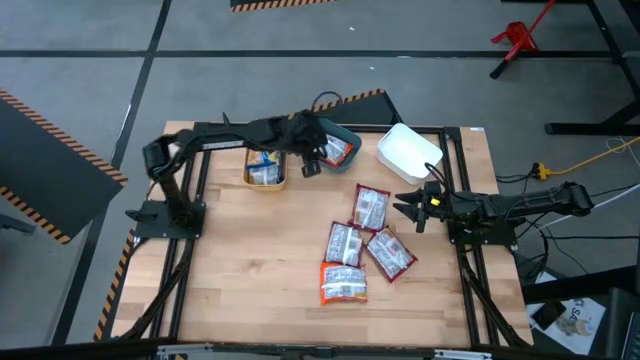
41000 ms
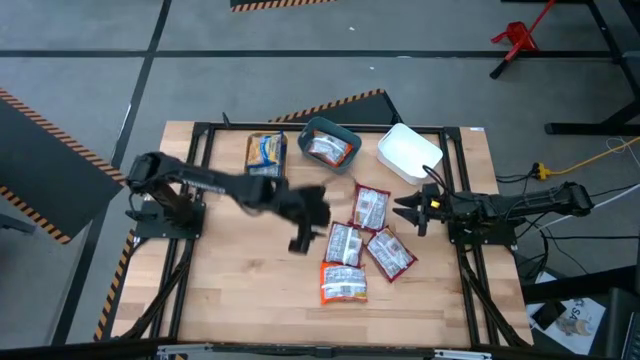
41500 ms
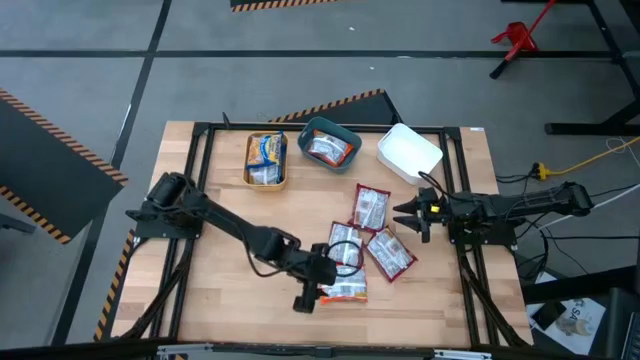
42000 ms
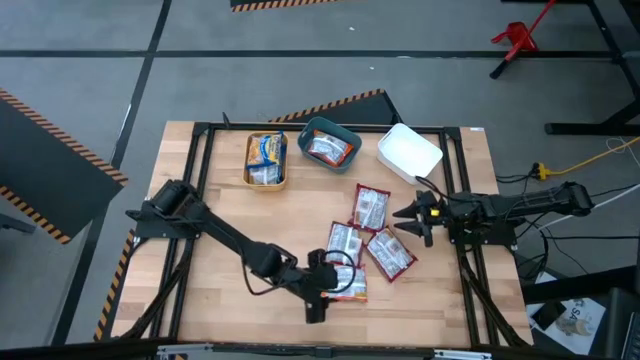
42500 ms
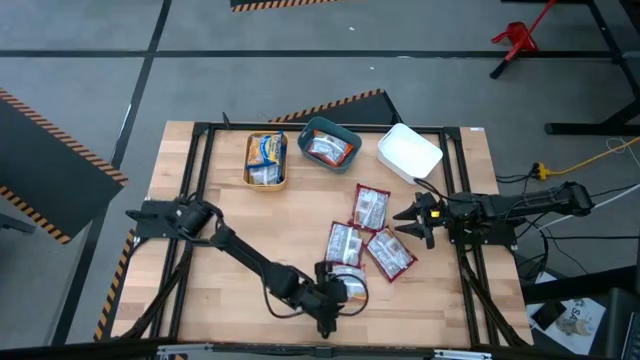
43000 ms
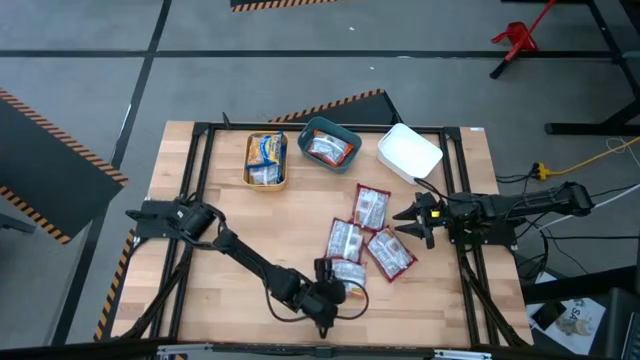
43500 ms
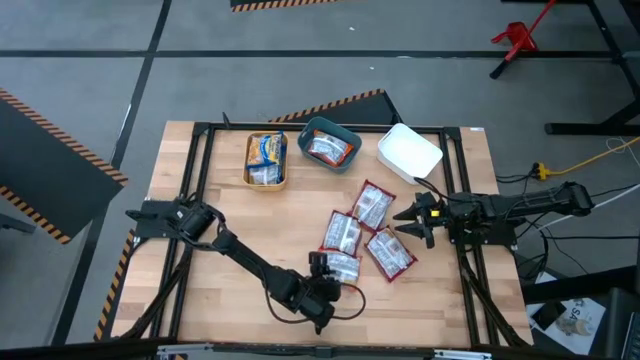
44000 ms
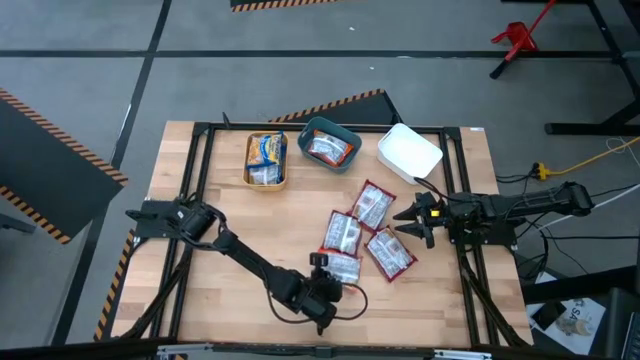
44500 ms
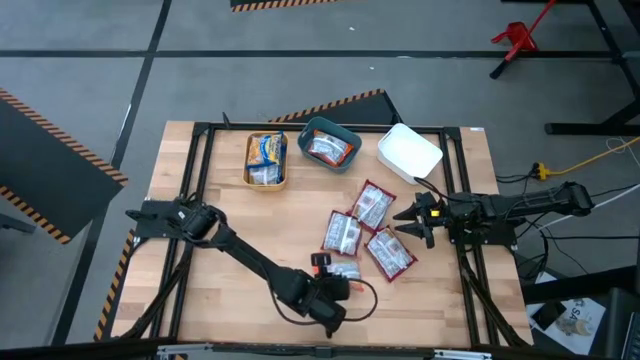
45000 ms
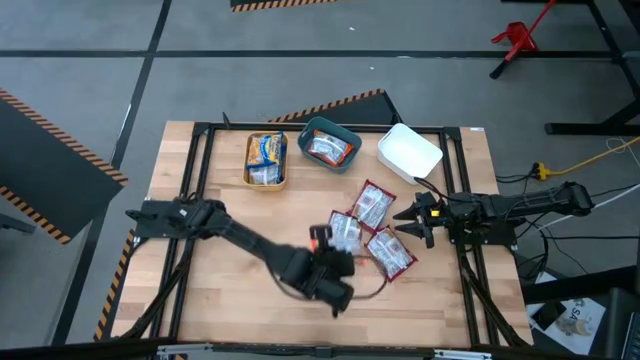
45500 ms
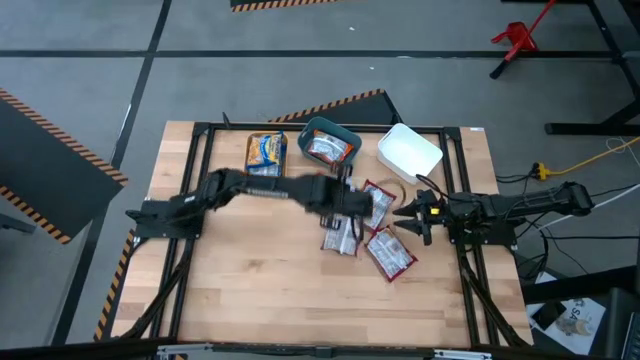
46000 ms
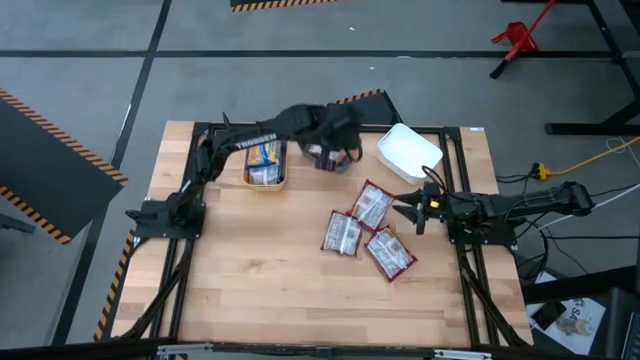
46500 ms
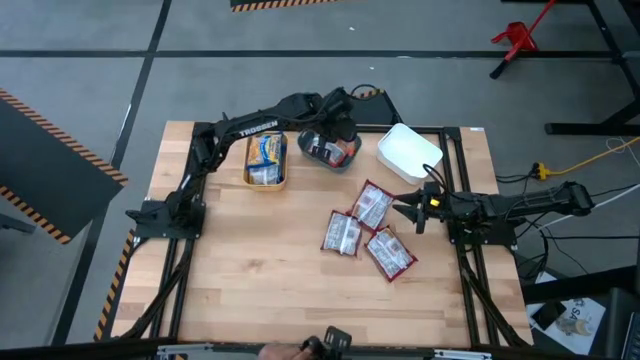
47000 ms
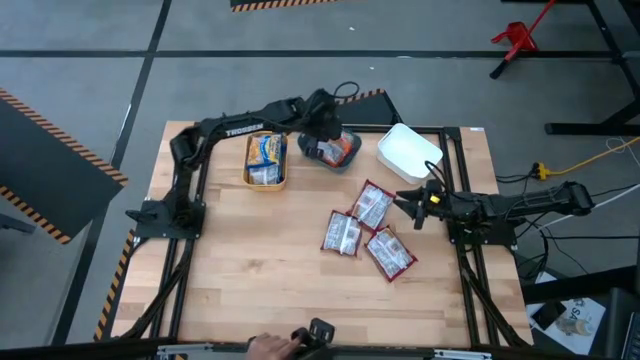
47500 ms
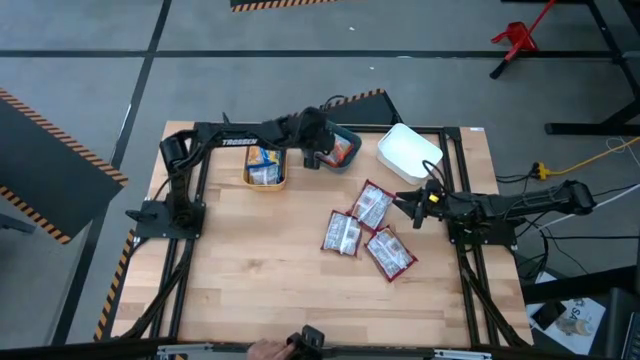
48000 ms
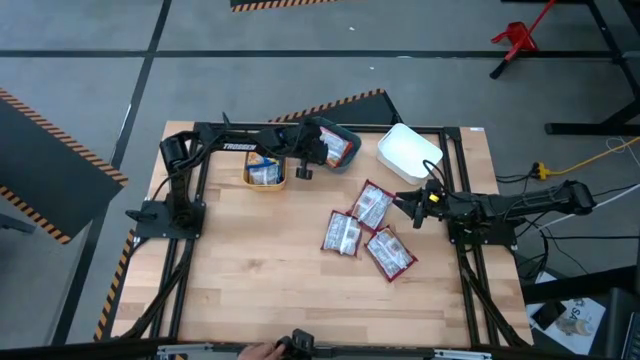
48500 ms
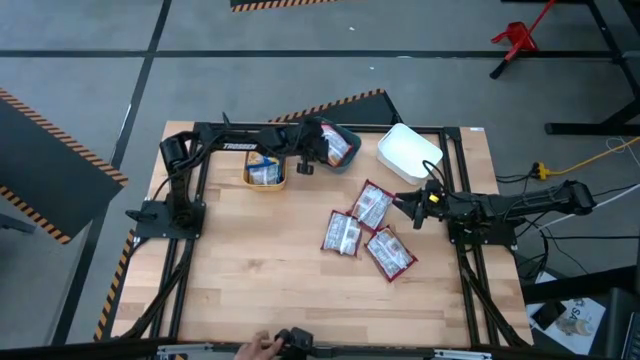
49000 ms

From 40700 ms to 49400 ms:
Task: Sort Maruchan noodles
Put the orange noodle pack into the blue bin

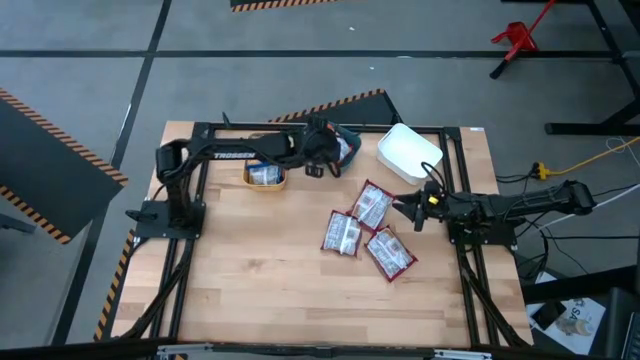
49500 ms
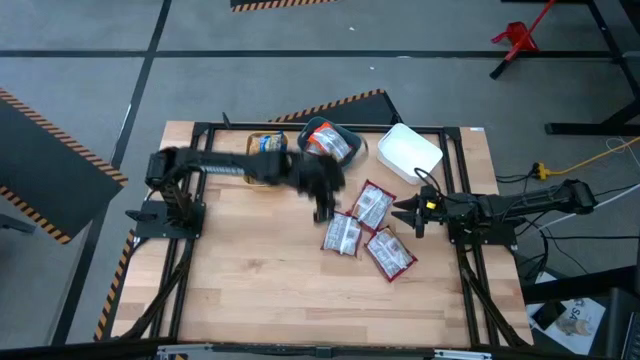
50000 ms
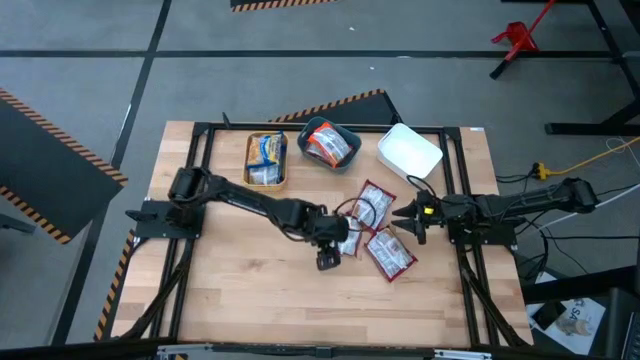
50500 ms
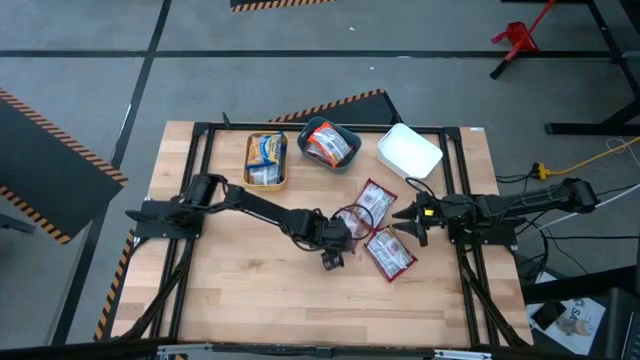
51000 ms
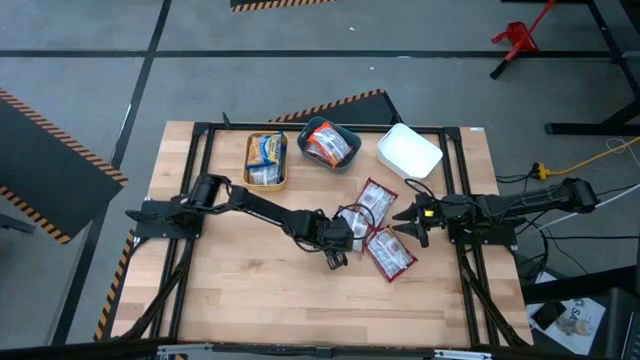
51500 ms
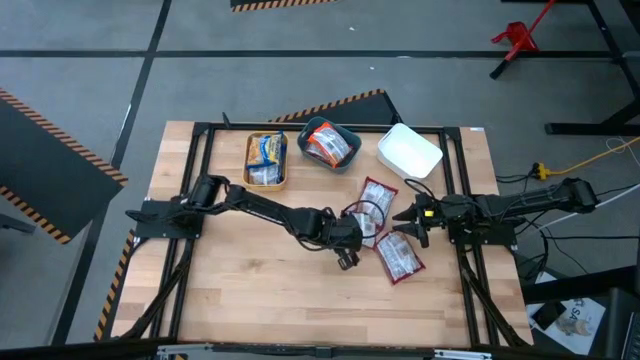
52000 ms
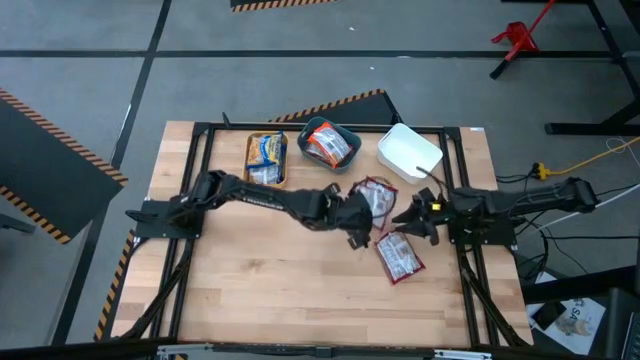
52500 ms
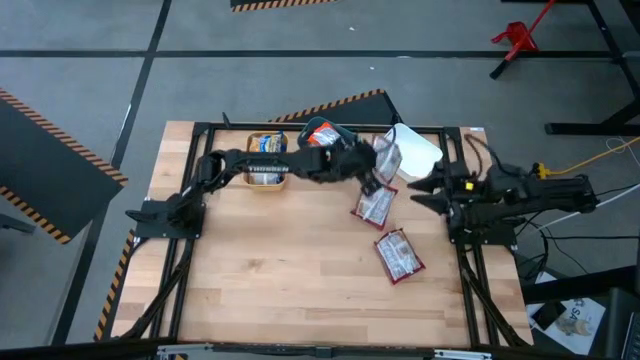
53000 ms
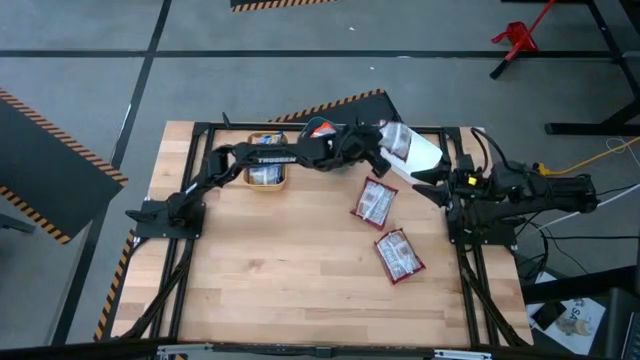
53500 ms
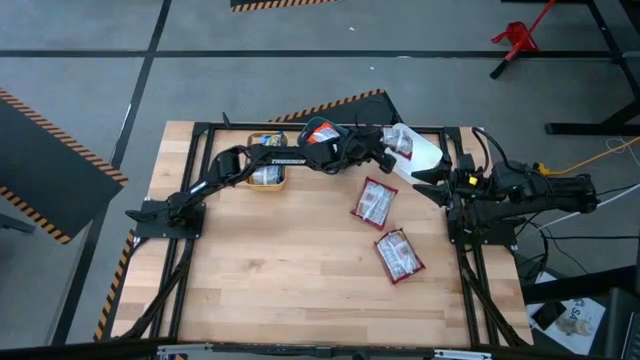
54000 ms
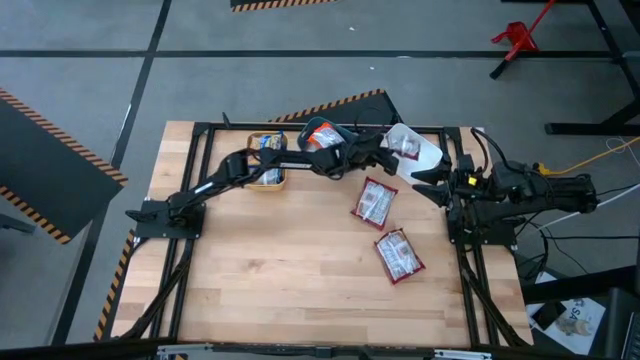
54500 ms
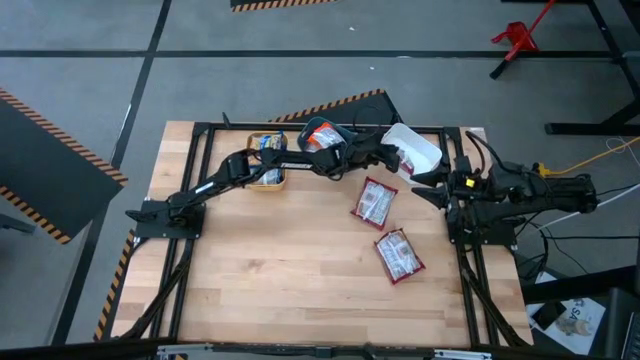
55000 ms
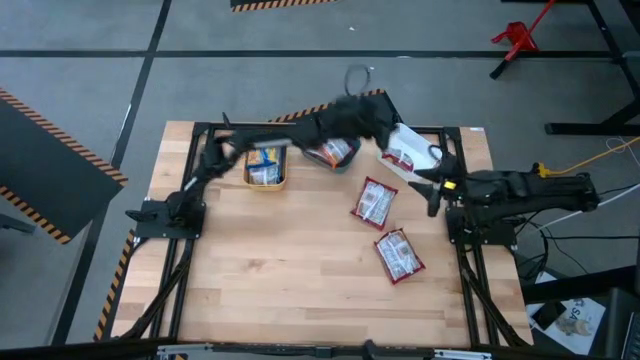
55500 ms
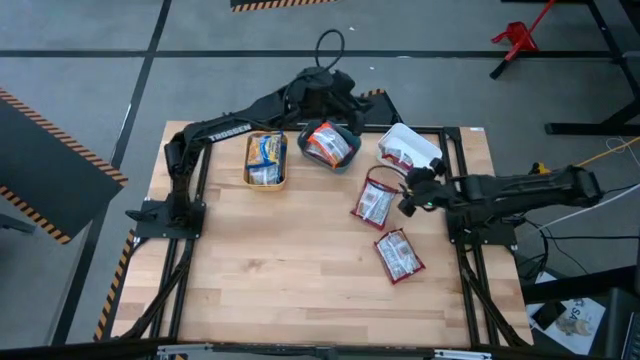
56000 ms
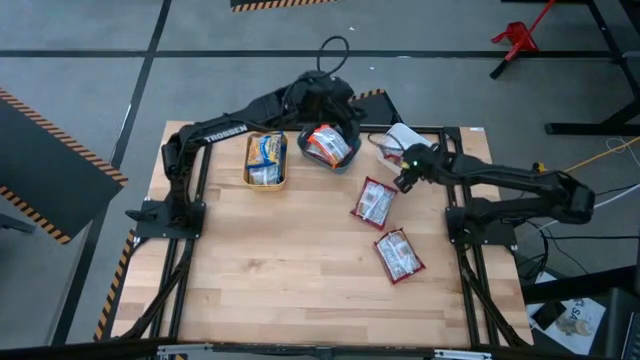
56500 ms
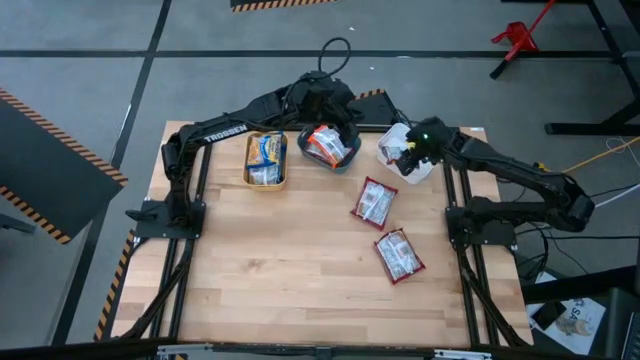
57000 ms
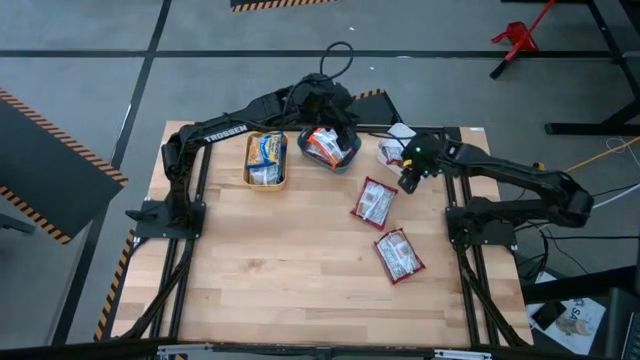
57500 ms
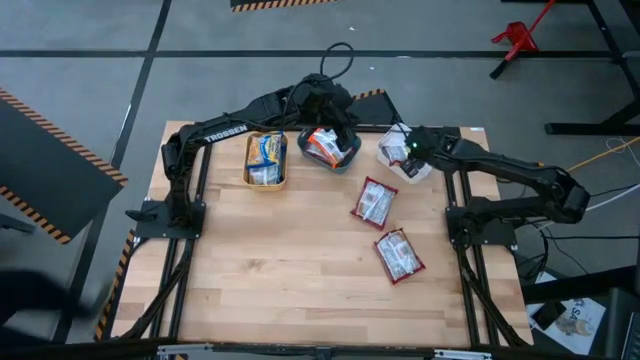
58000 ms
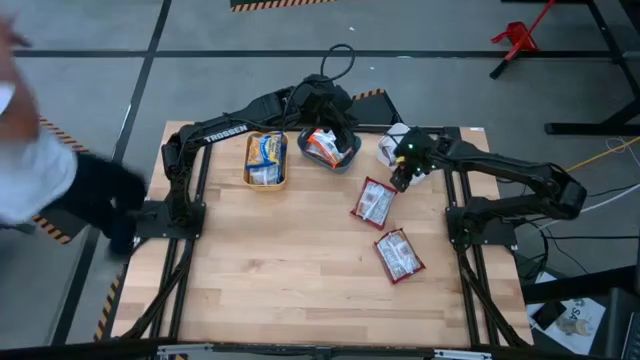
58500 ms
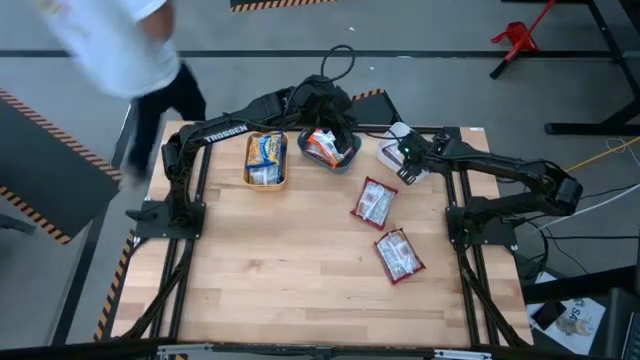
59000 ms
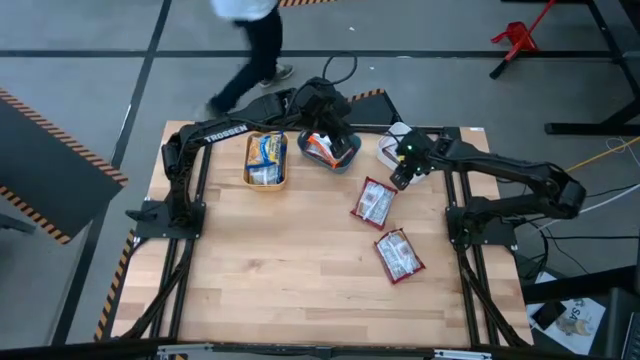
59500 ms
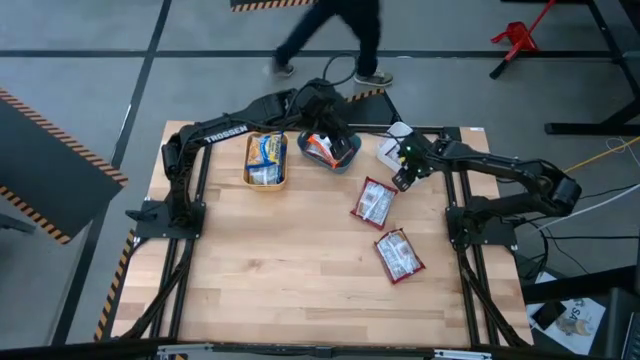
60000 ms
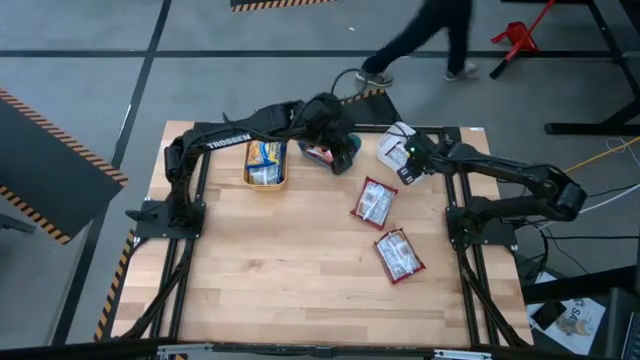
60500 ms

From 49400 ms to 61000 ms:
Put the middle red noodle pack into the white bin

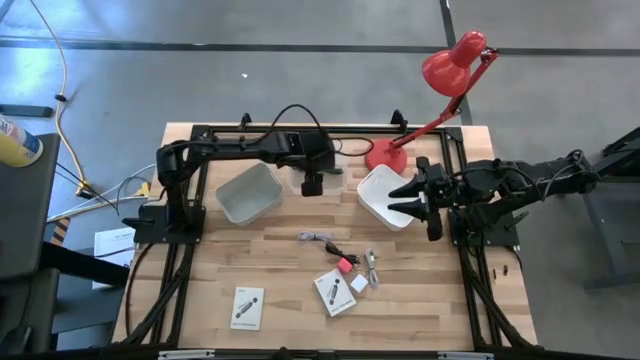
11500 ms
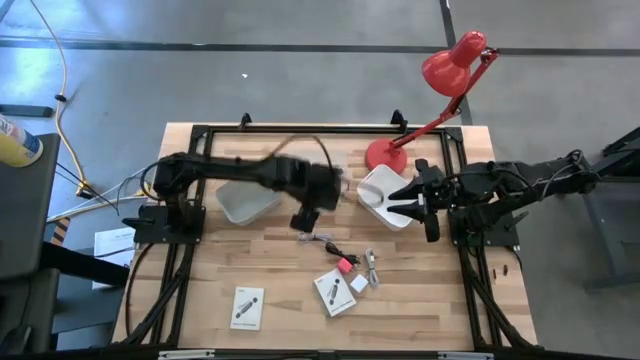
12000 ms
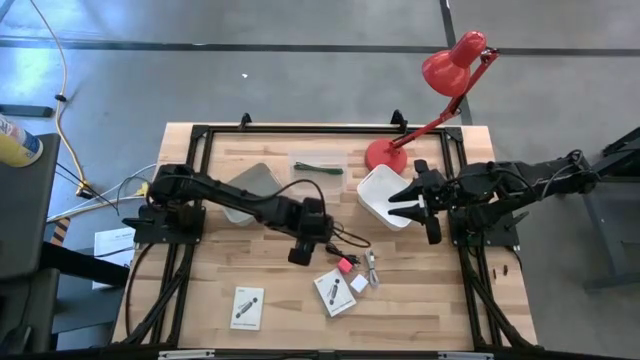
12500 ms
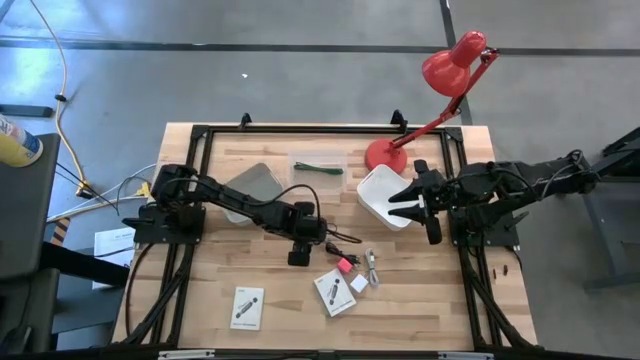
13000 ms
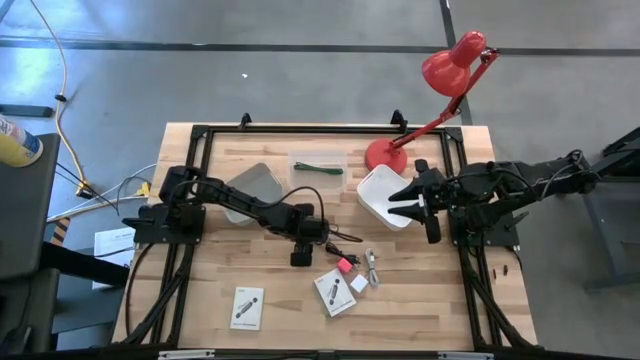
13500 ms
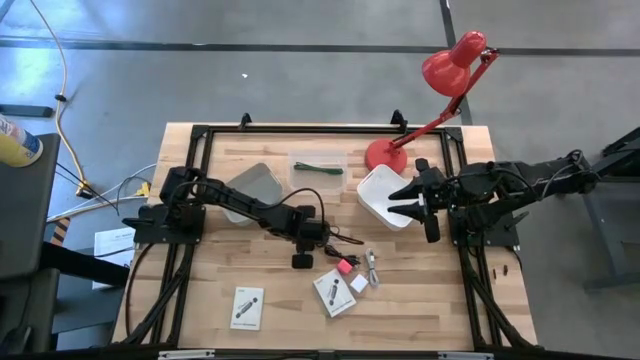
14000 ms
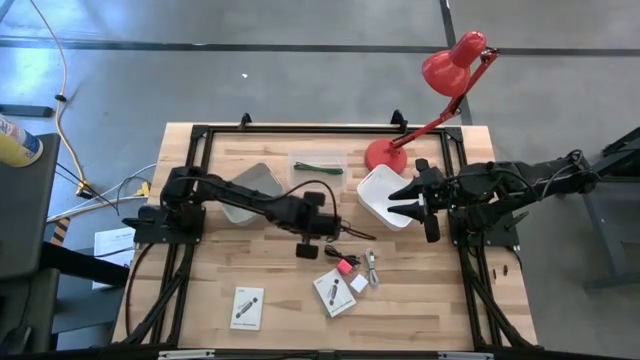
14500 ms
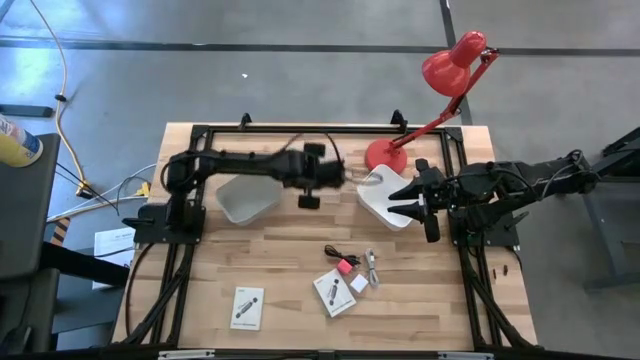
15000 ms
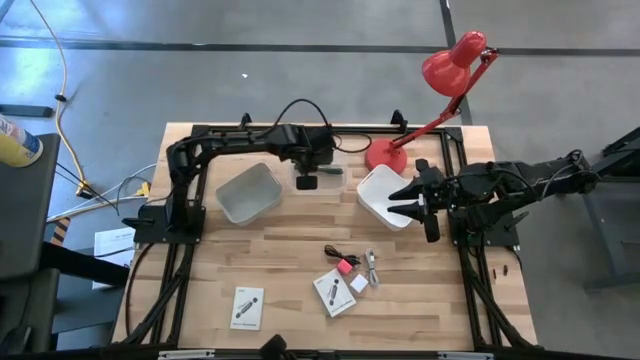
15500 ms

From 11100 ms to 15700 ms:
Task: Pick and place items into bin
Put the left white charger cable into the transparent bin
